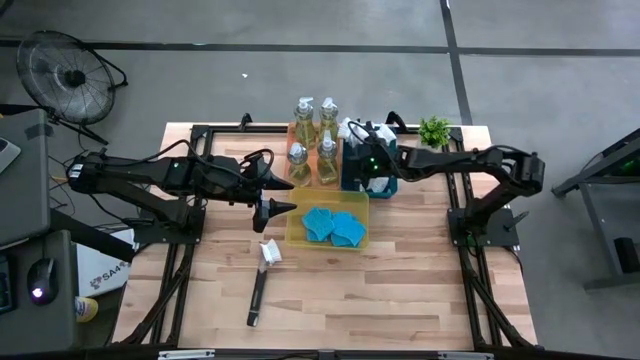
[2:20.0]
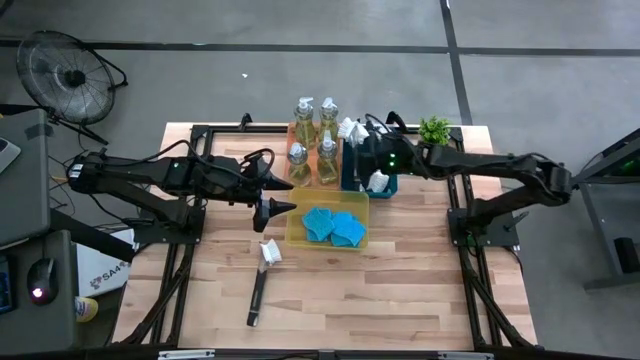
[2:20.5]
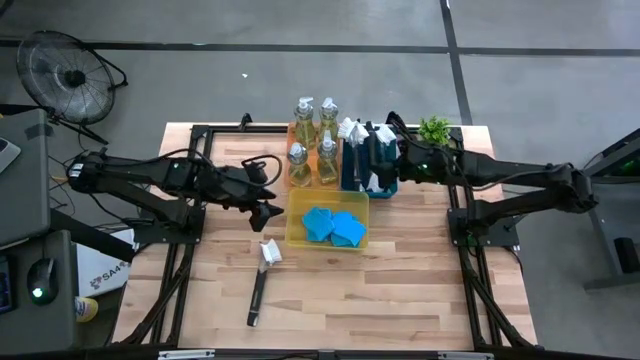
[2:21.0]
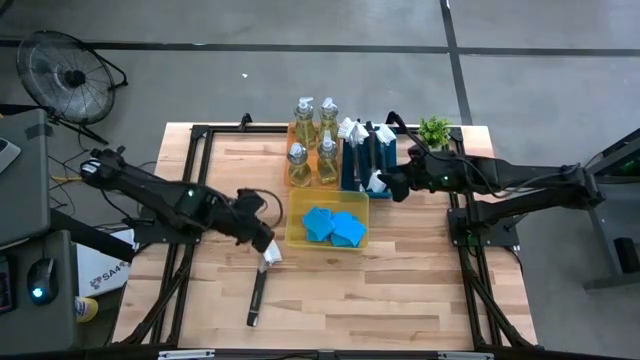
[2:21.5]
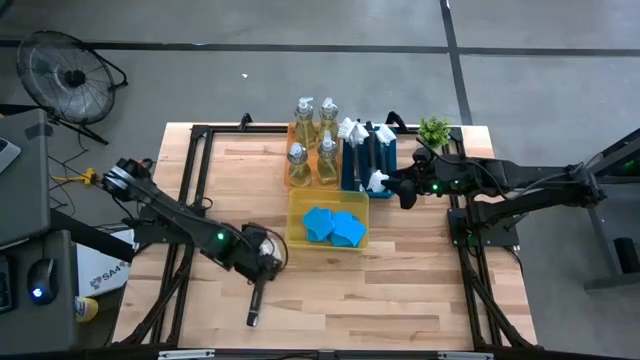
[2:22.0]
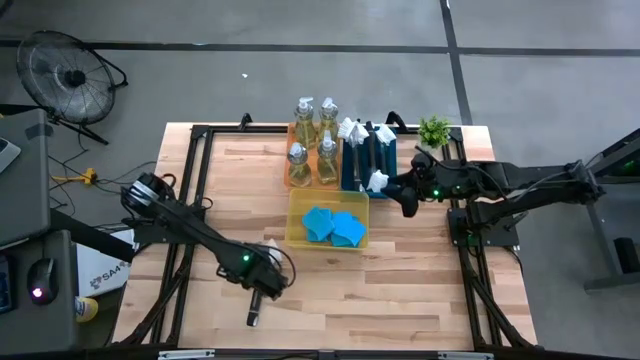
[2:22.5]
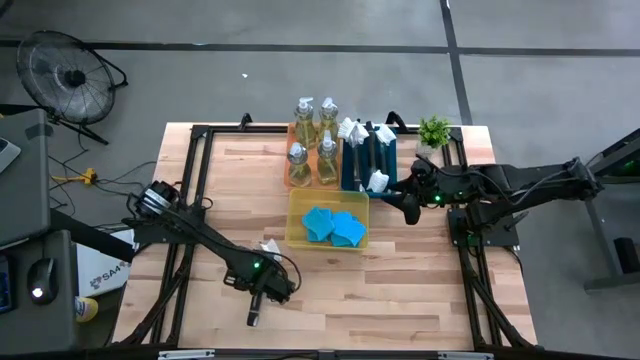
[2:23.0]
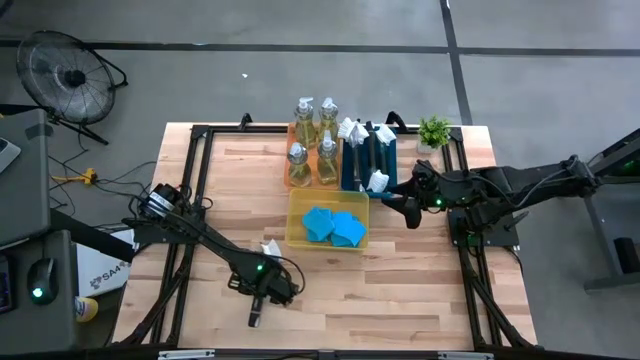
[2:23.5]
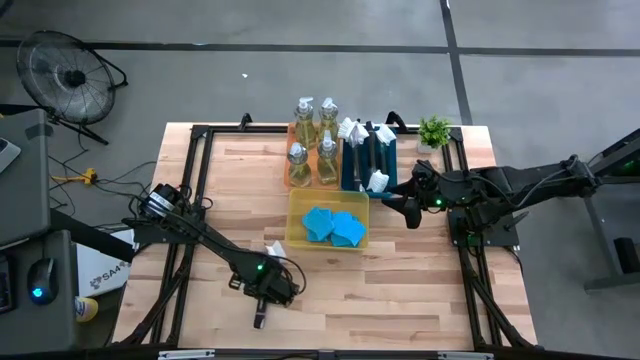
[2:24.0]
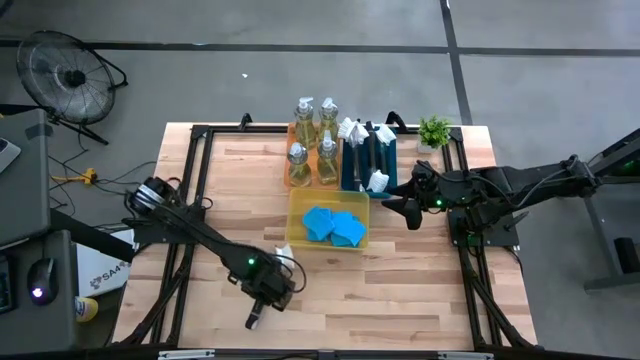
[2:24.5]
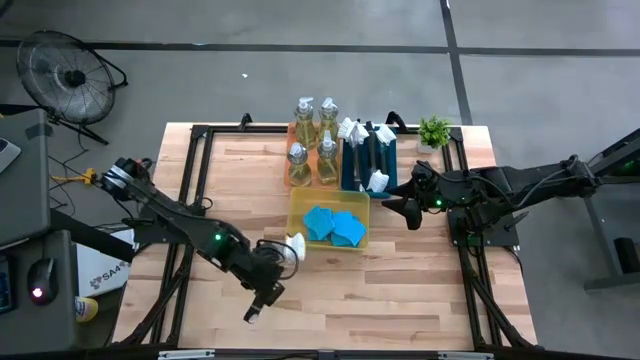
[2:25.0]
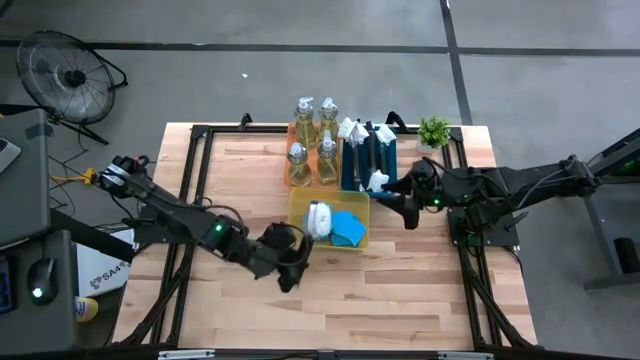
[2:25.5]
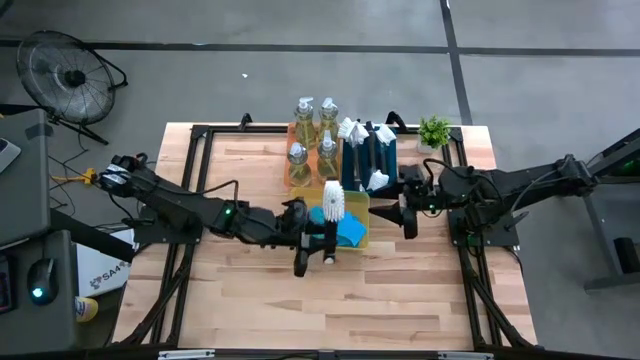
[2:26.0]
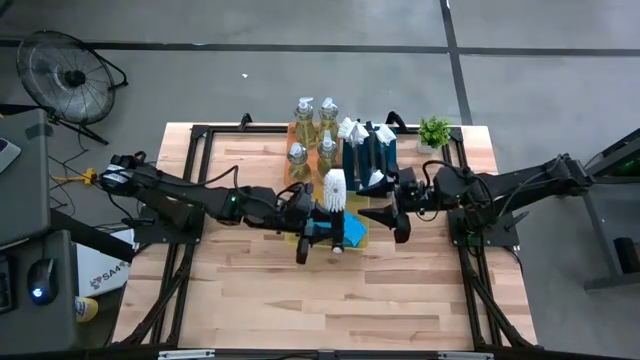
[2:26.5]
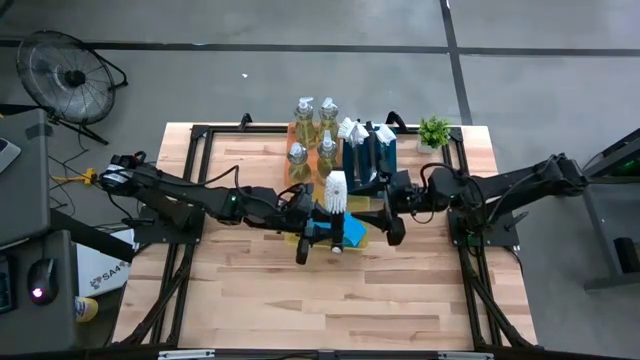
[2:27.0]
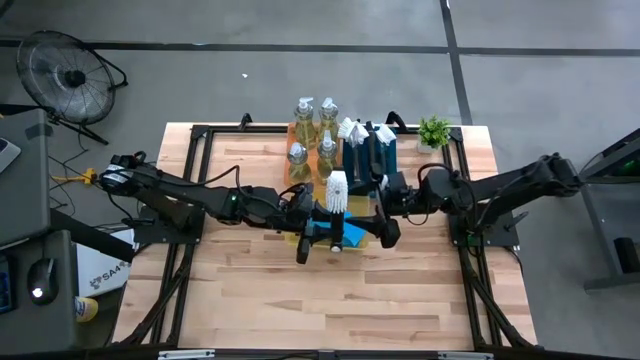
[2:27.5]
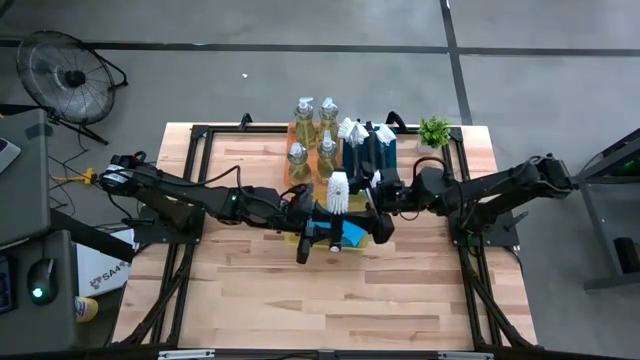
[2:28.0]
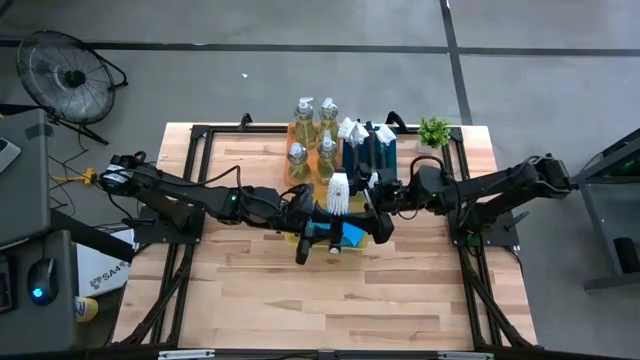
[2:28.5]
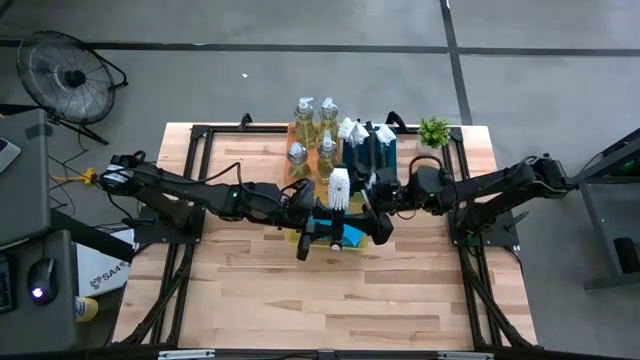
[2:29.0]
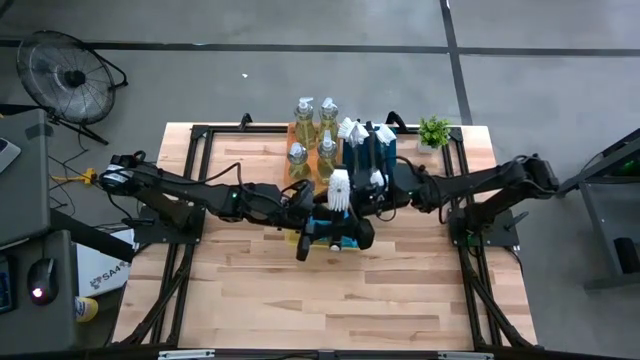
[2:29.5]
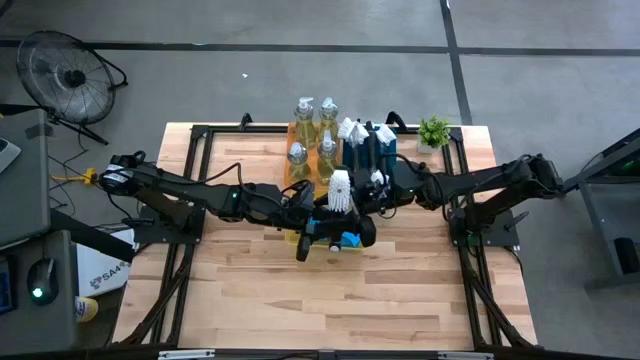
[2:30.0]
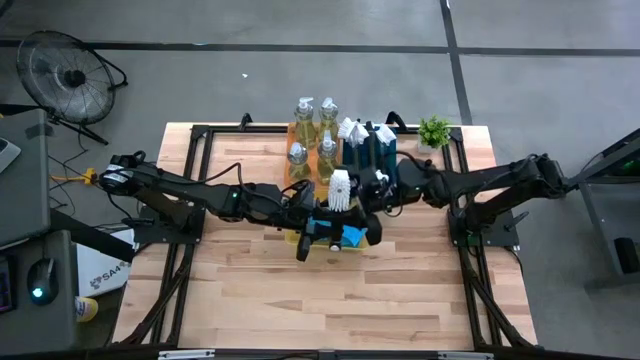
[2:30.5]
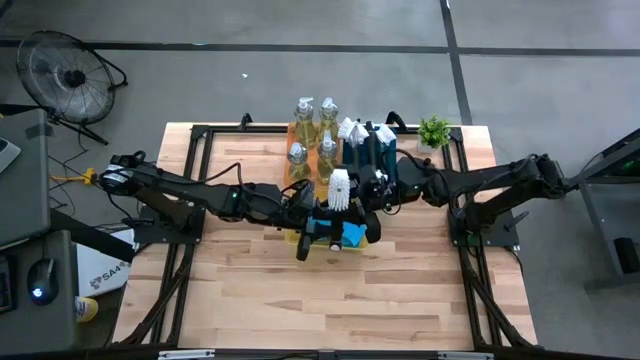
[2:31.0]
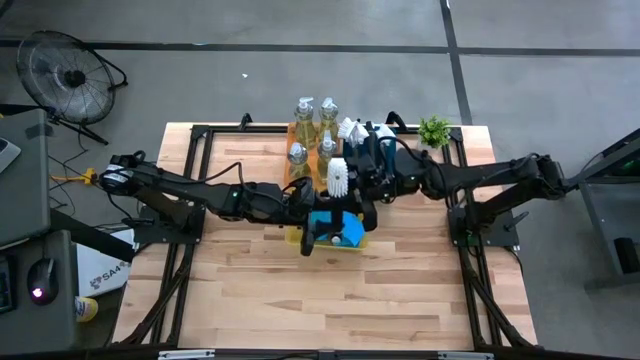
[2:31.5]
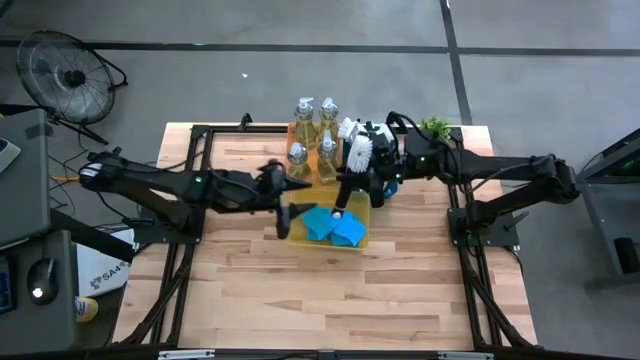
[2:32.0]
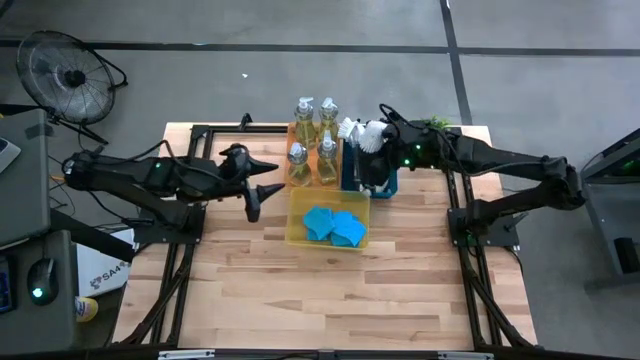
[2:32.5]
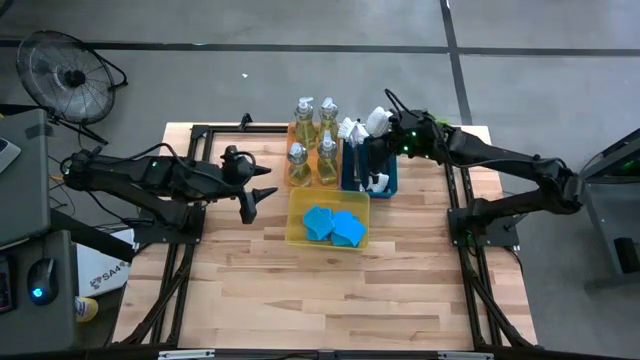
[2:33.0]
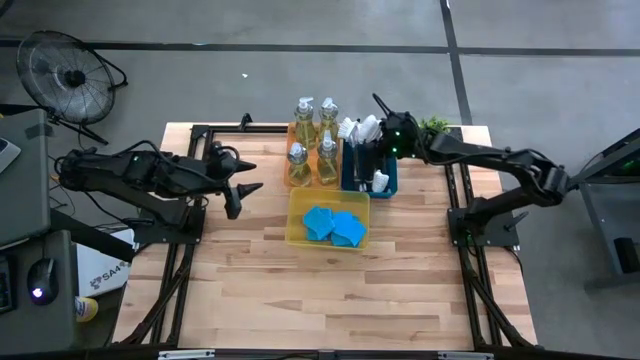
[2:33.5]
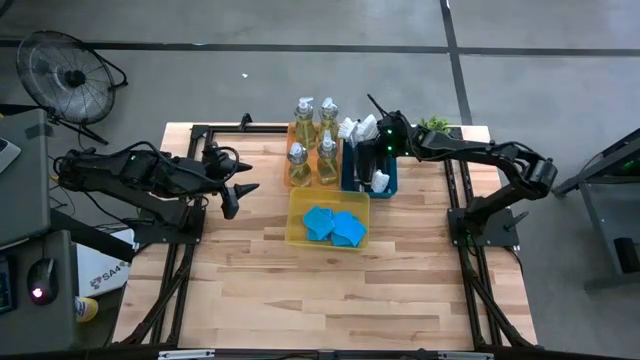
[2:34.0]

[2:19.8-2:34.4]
Task: Pick & Place Kitchen Sink Supplies
Put the dish brush into the blue bin

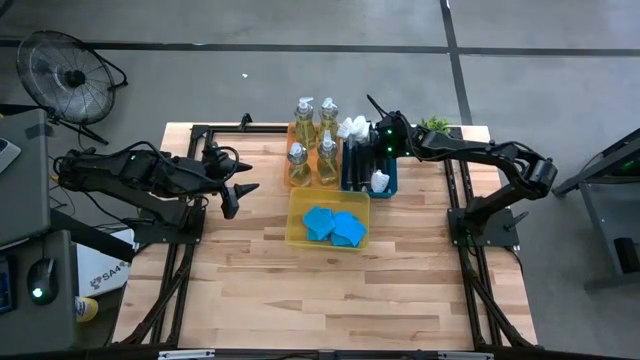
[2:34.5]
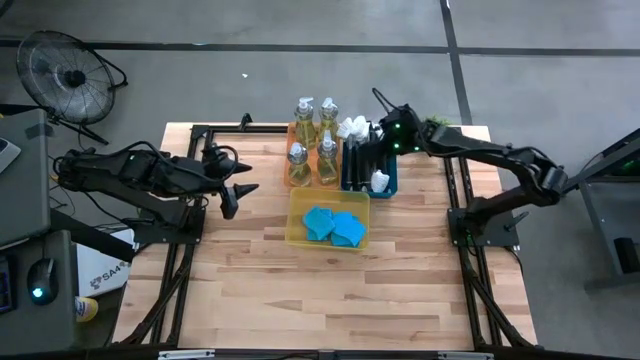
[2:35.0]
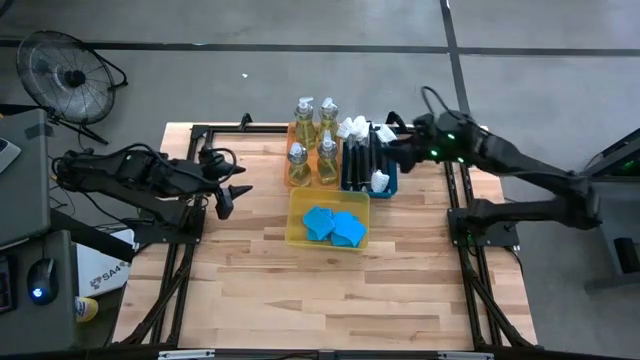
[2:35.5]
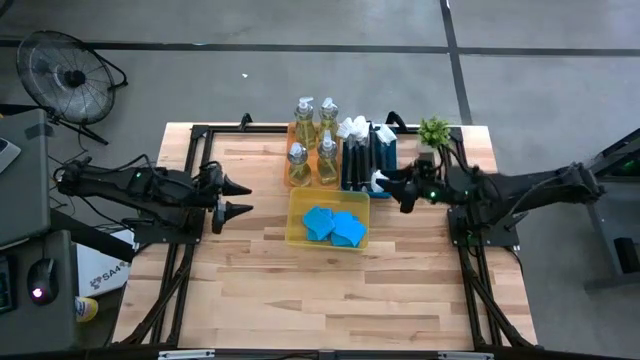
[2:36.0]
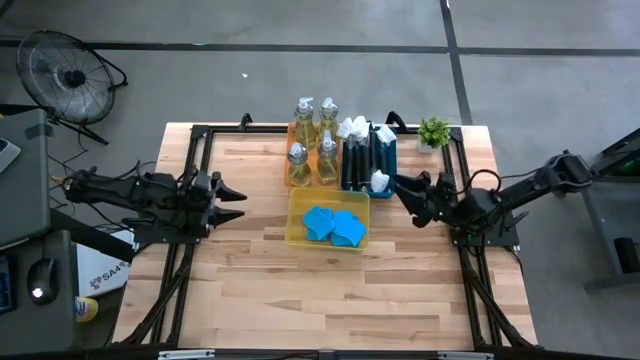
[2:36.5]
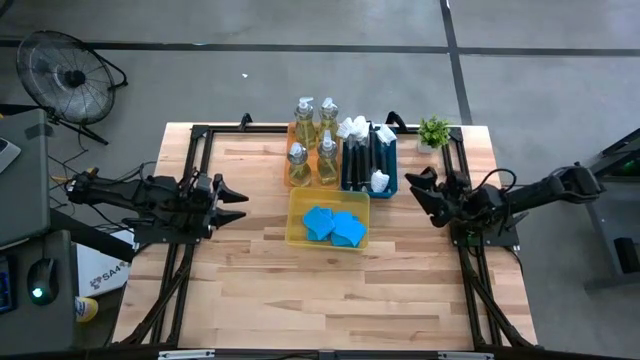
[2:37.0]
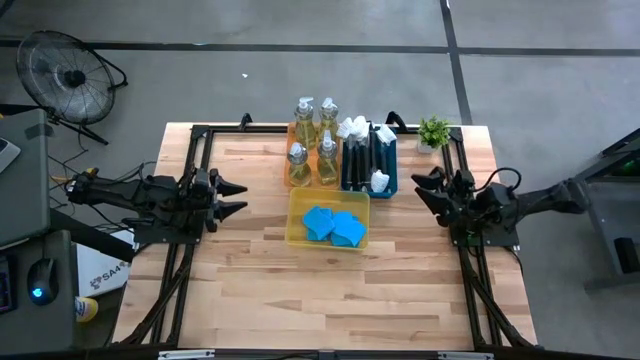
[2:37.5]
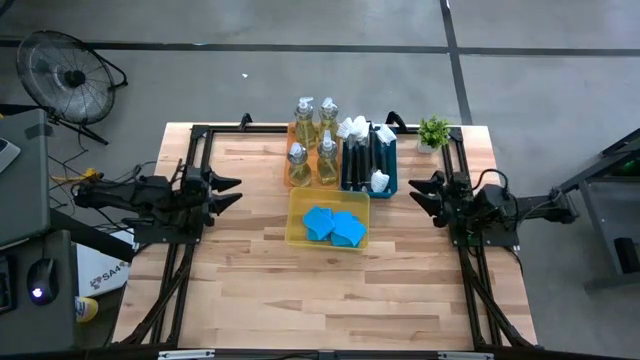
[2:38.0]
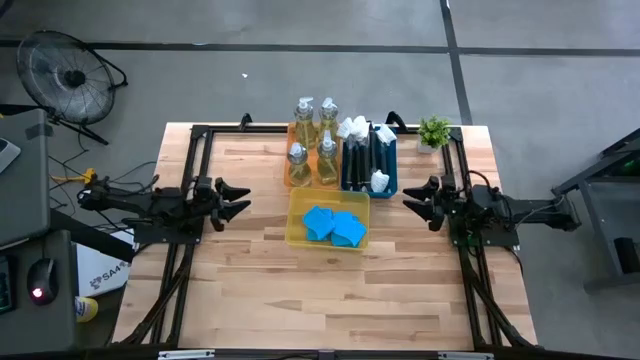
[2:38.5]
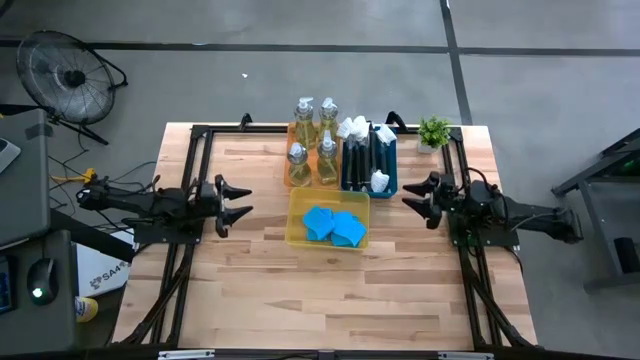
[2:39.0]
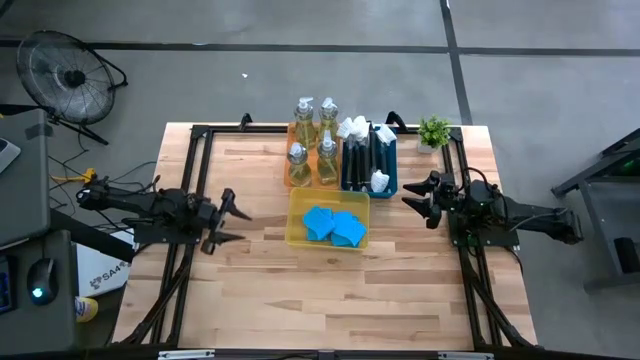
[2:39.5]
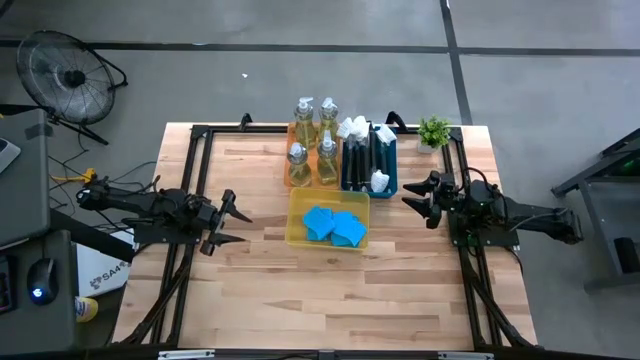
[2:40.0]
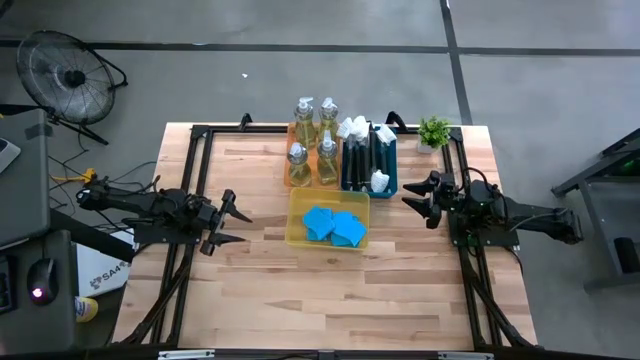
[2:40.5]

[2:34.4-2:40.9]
Return to Home Position
